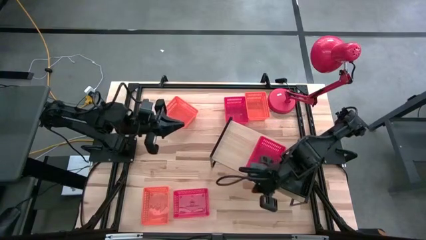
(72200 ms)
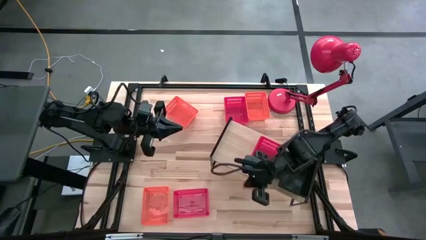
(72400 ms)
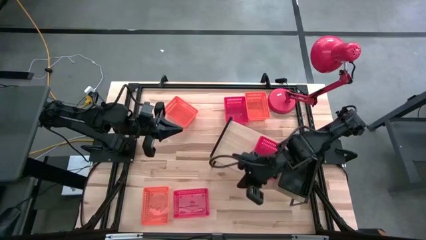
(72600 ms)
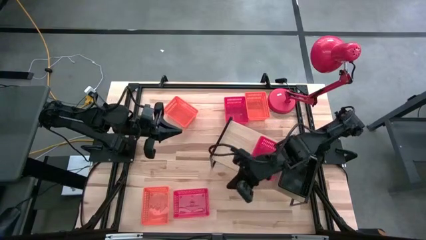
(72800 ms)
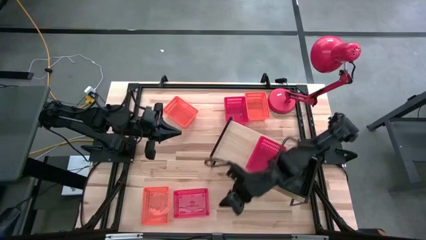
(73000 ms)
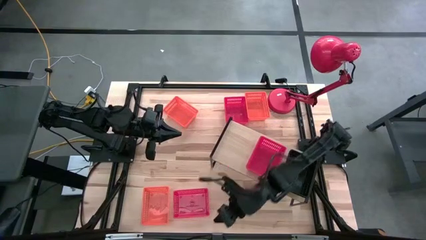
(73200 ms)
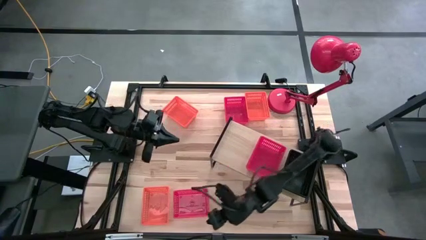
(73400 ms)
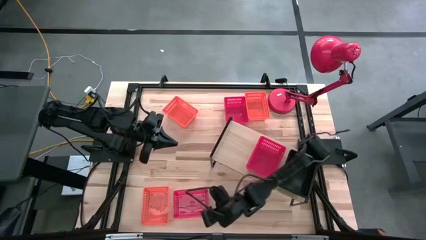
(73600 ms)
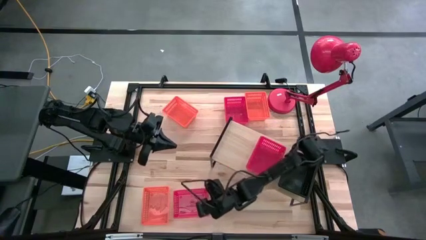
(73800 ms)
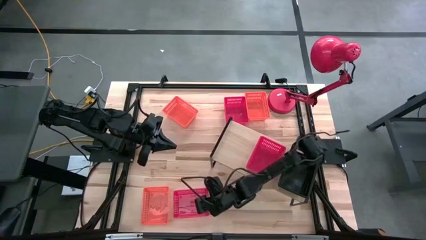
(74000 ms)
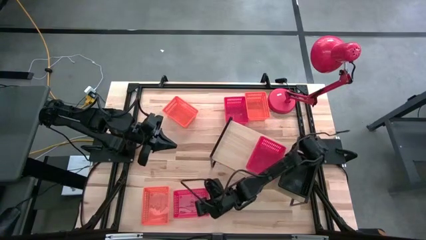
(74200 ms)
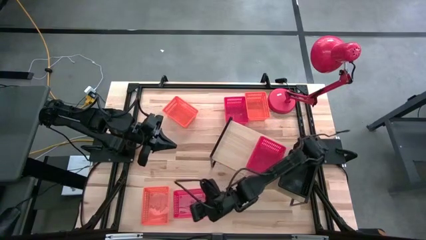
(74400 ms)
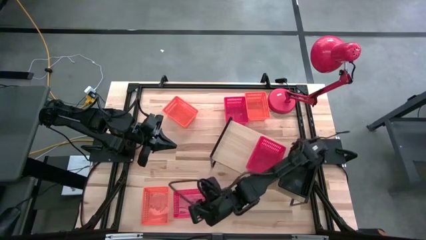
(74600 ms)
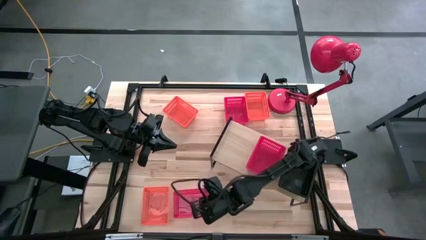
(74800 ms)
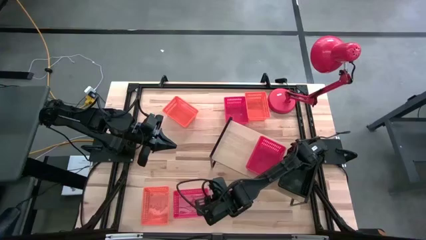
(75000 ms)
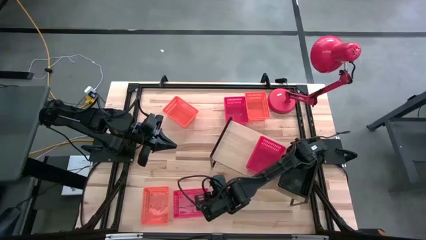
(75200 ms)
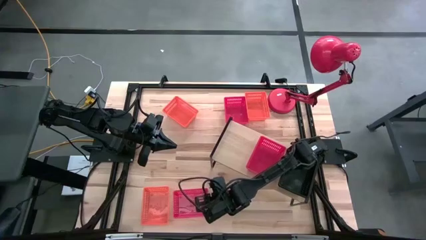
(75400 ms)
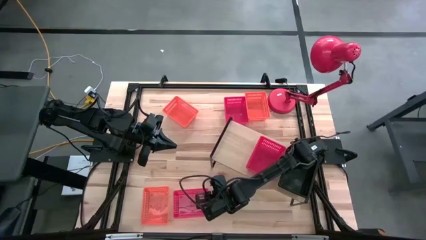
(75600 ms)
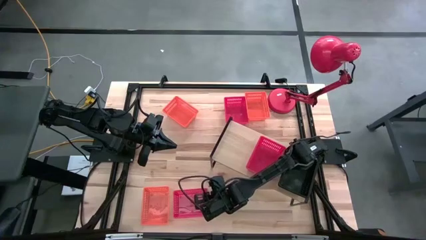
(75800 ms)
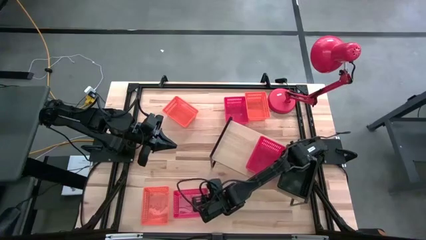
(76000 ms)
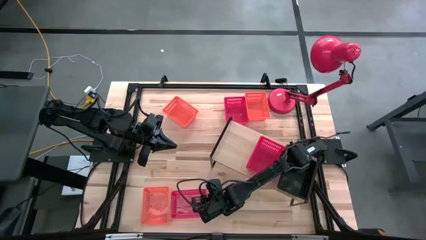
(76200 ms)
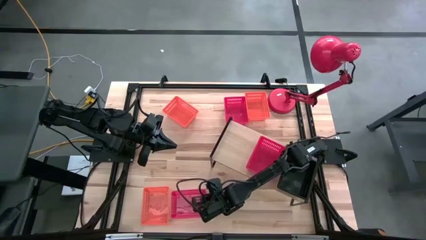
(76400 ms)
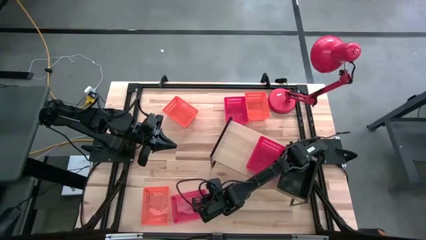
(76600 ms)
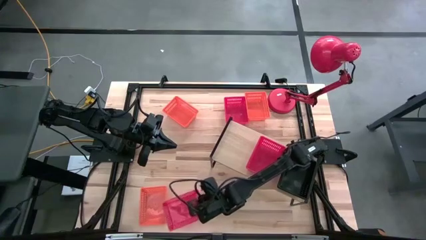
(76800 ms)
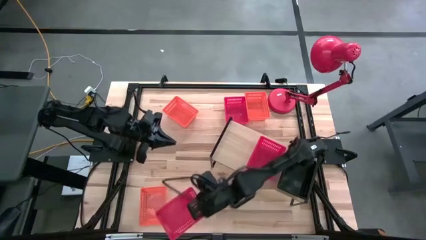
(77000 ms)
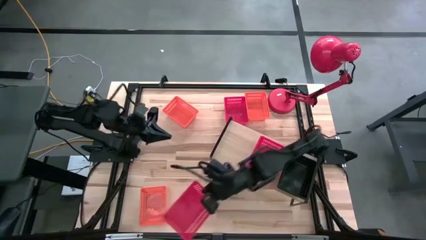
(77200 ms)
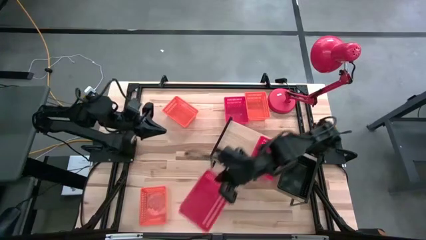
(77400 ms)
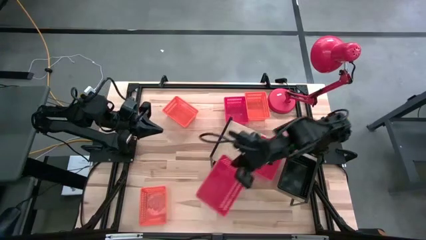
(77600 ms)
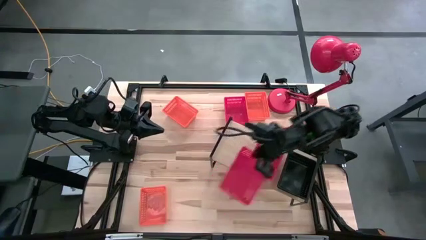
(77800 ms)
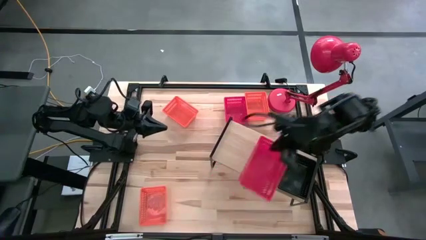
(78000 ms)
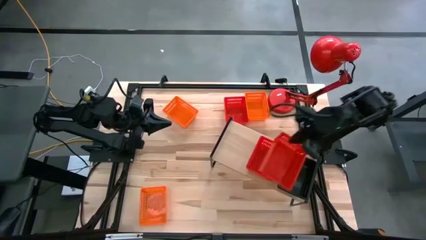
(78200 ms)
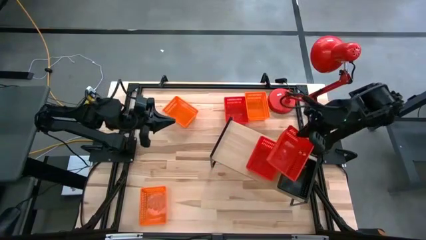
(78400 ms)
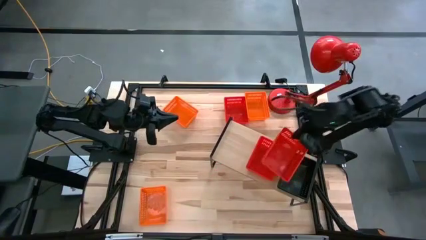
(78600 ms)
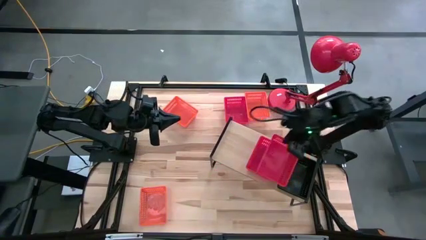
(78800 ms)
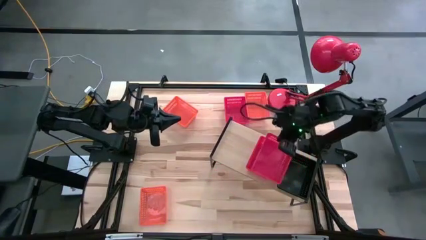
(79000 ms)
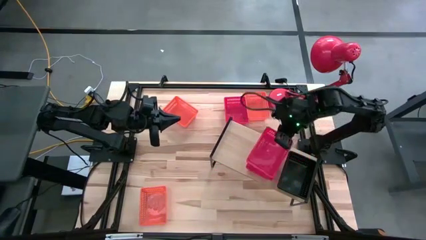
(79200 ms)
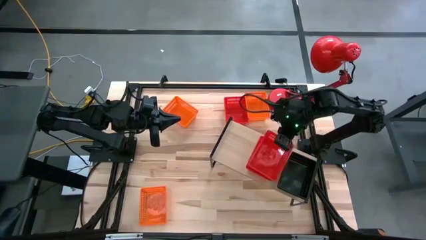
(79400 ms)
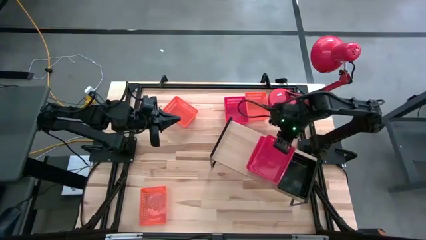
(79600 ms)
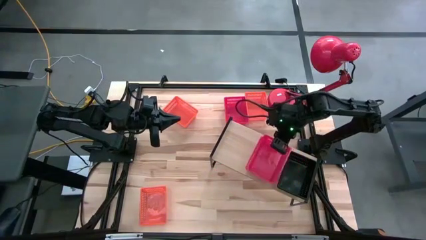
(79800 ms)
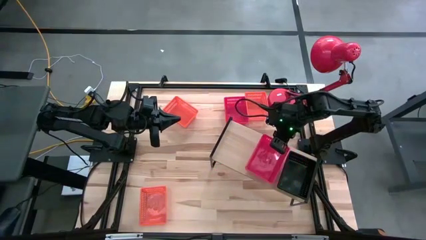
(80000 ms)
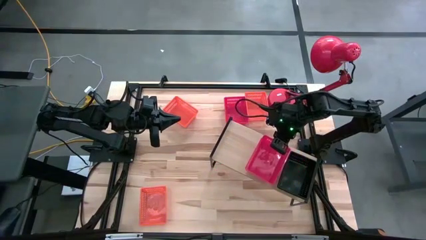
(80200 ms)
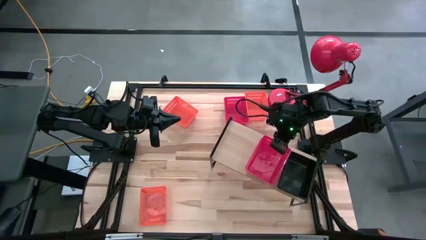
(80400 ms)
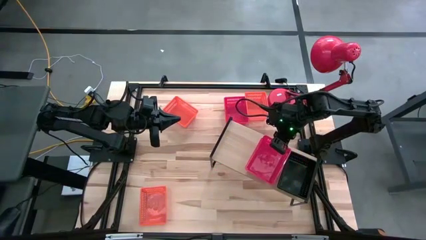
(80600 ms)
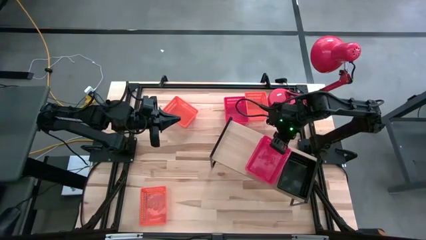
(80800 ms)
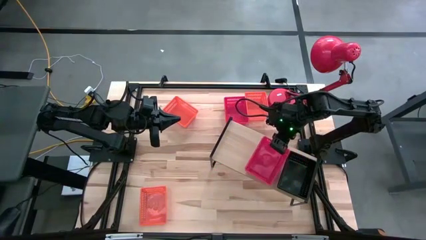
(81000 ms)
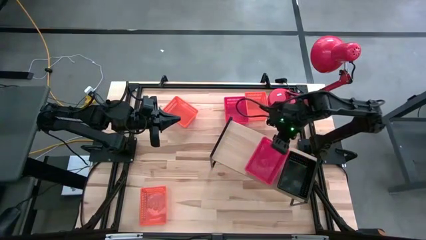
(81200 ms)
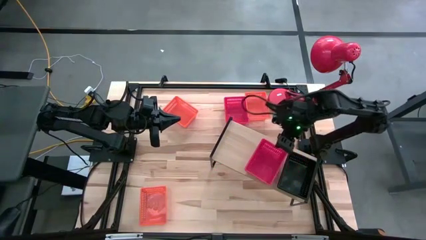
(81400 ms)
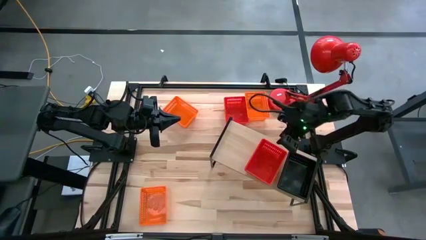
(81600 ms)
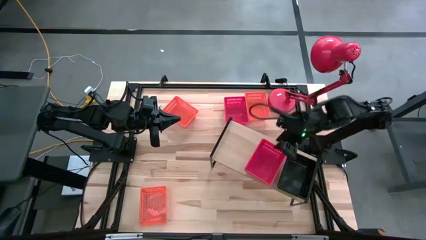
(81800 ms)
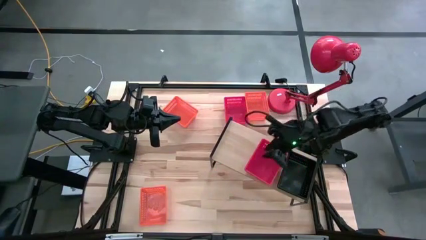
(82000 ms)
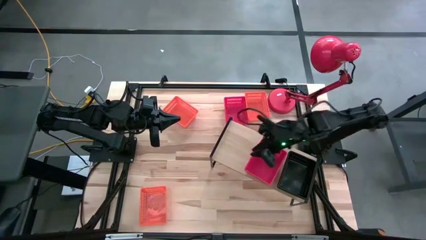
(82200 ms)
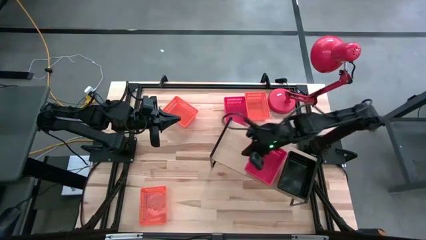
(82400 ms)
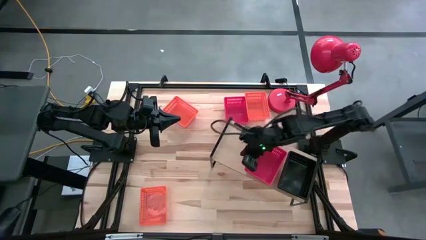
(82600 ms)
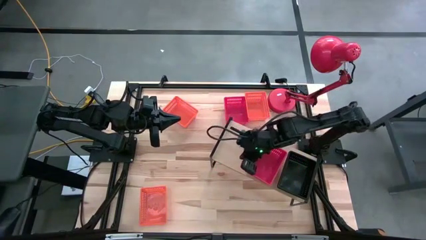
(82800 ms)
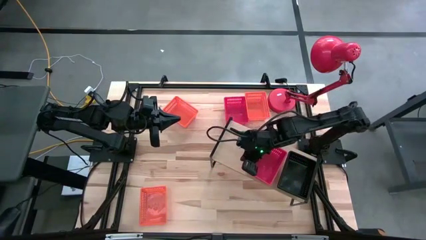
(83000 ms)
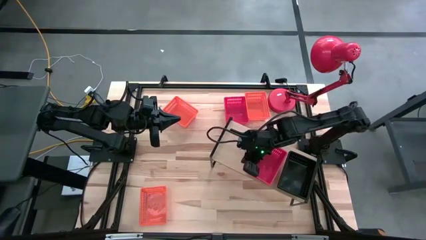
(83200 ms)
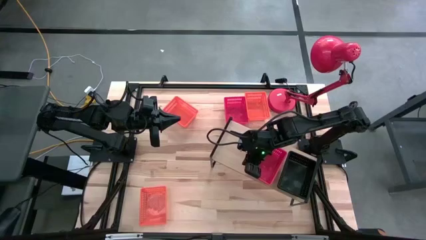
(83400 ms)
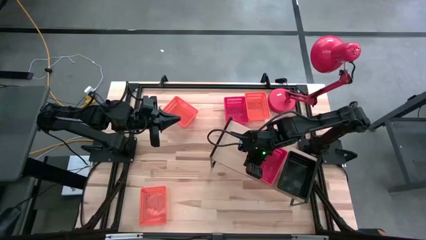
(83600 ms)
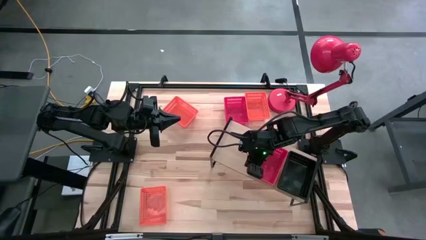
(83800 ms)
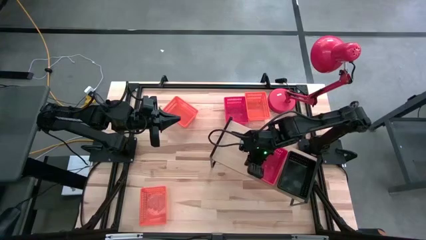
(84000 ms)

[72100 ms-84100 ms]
Task: Stack baskets on shelf by color
Stack the bottom red bin on the red bin on the shelf
